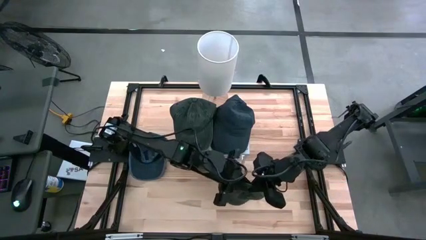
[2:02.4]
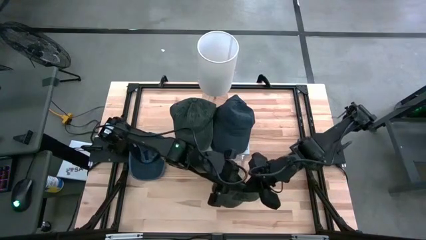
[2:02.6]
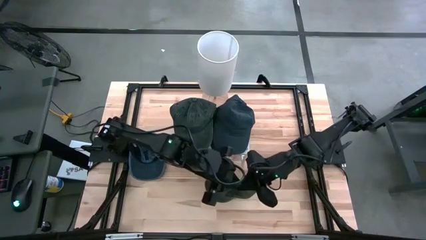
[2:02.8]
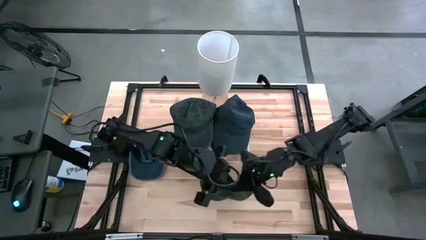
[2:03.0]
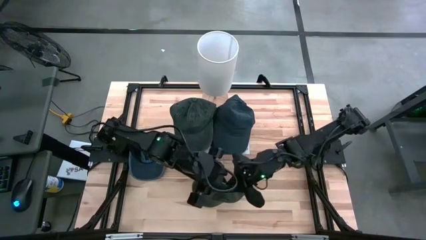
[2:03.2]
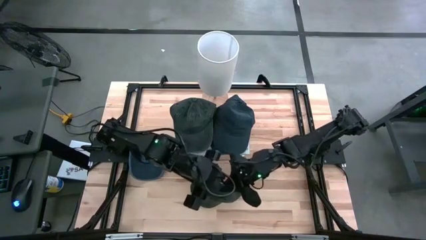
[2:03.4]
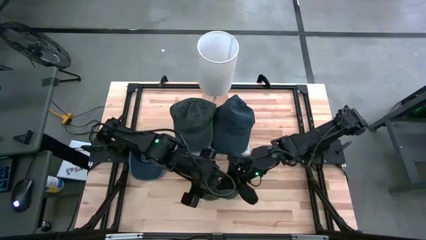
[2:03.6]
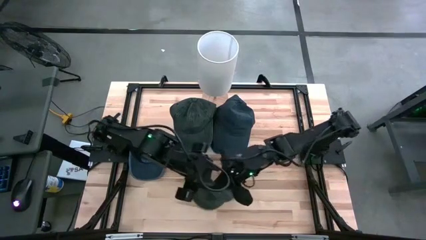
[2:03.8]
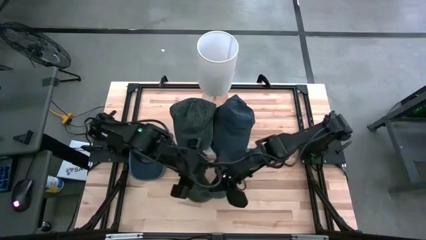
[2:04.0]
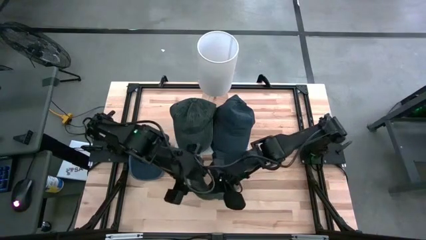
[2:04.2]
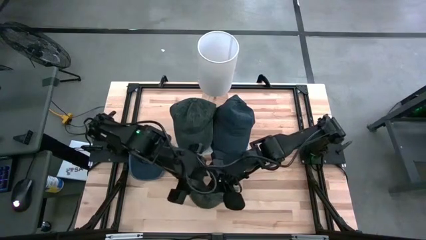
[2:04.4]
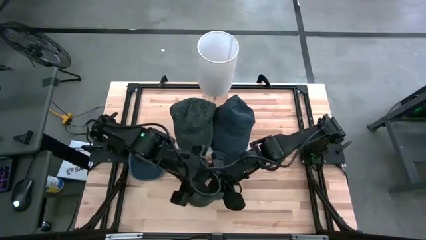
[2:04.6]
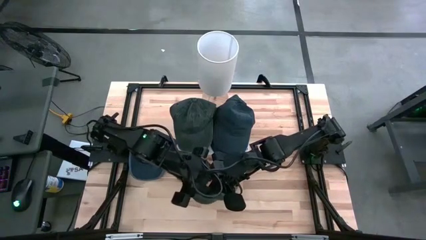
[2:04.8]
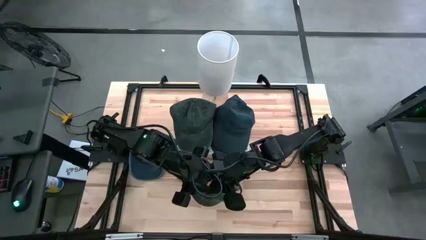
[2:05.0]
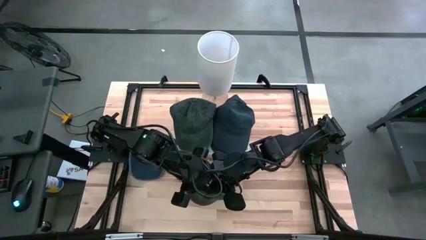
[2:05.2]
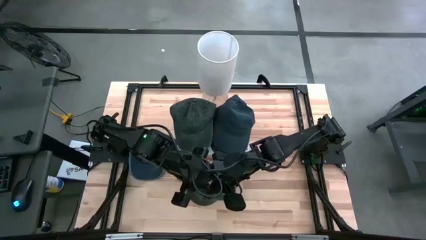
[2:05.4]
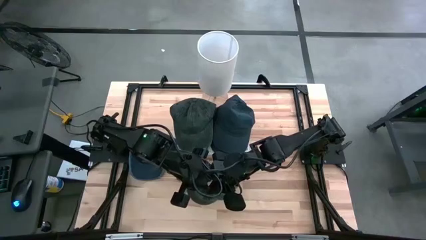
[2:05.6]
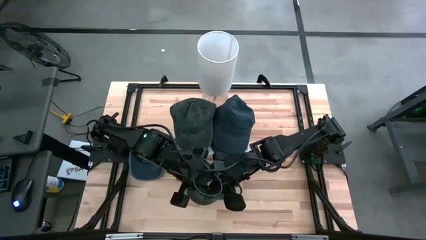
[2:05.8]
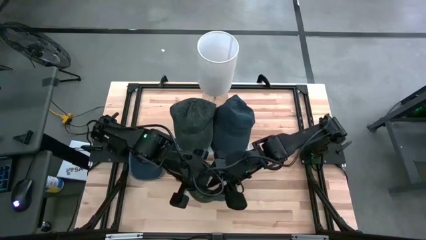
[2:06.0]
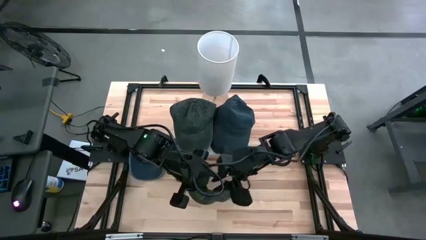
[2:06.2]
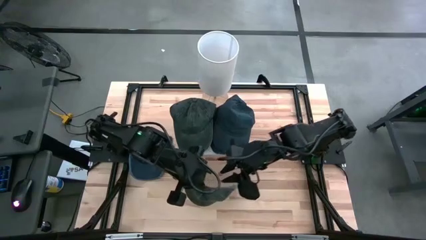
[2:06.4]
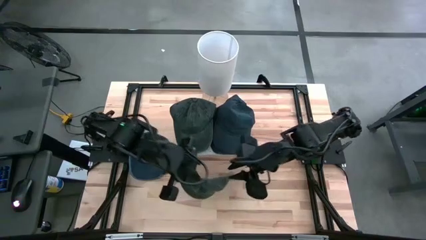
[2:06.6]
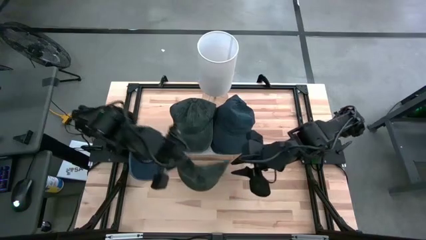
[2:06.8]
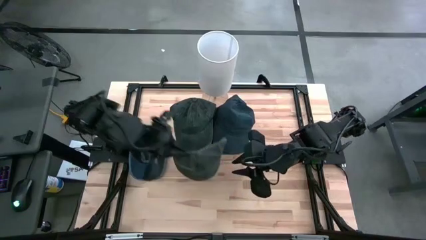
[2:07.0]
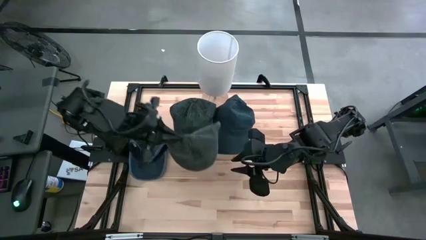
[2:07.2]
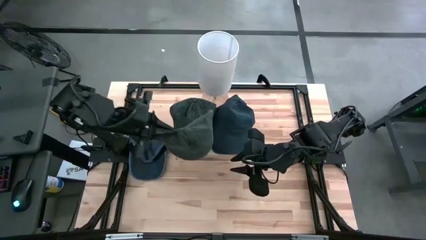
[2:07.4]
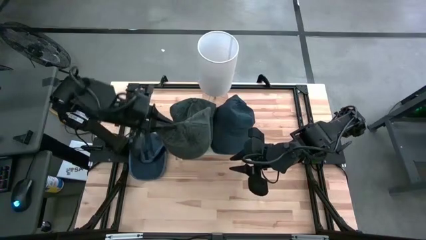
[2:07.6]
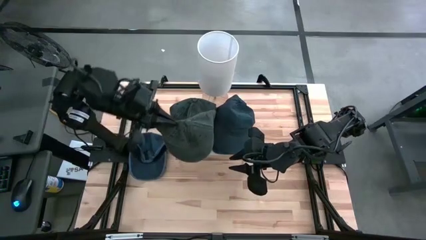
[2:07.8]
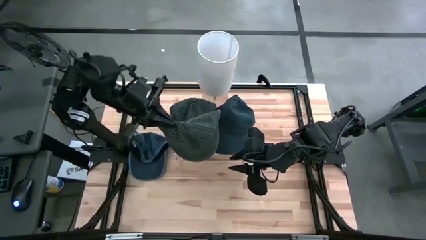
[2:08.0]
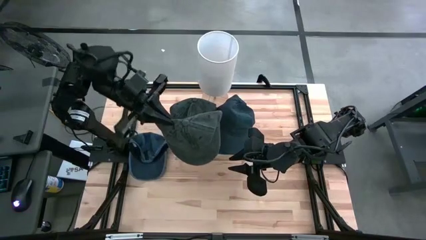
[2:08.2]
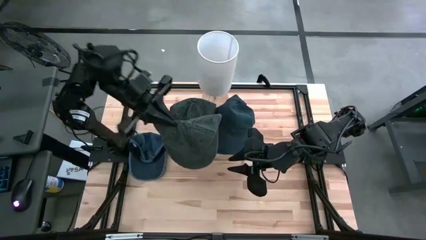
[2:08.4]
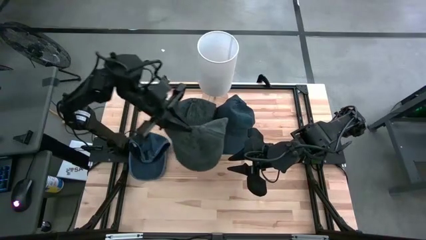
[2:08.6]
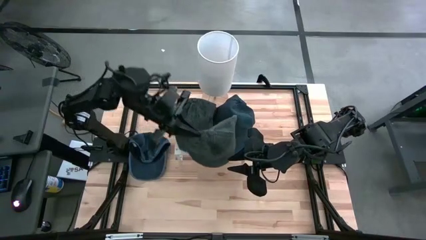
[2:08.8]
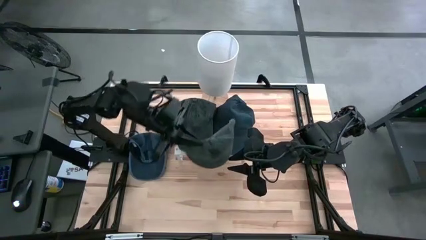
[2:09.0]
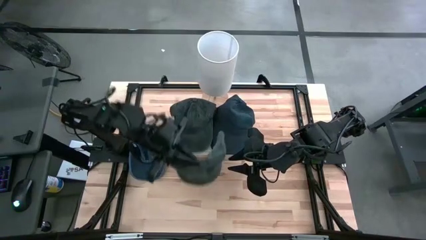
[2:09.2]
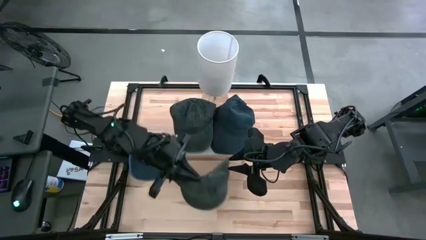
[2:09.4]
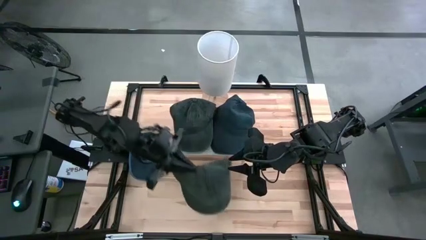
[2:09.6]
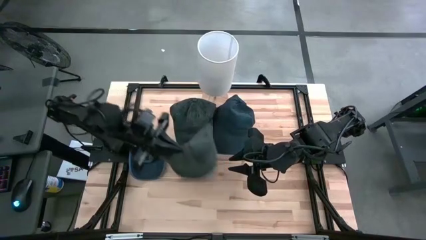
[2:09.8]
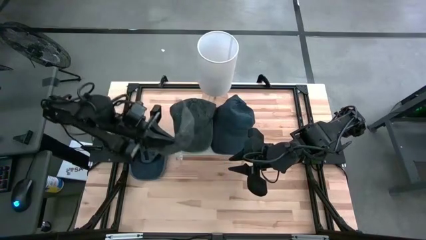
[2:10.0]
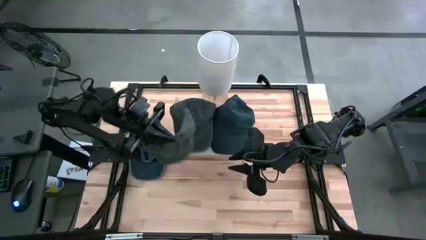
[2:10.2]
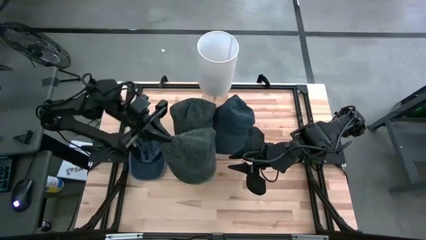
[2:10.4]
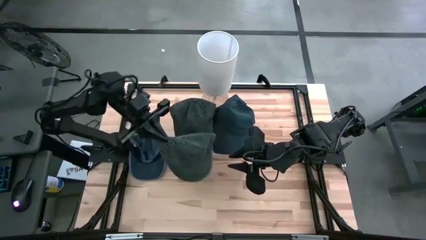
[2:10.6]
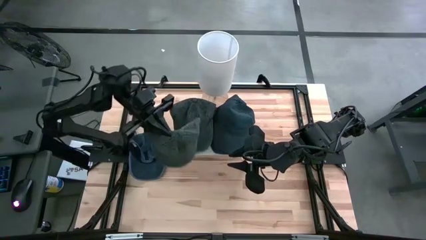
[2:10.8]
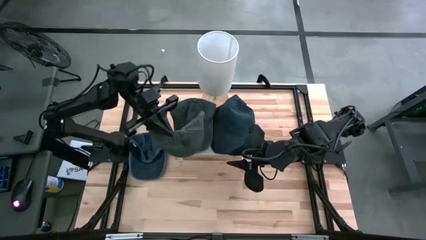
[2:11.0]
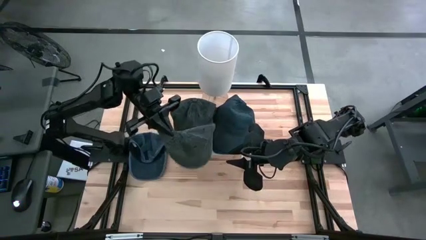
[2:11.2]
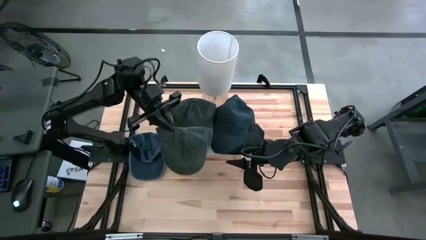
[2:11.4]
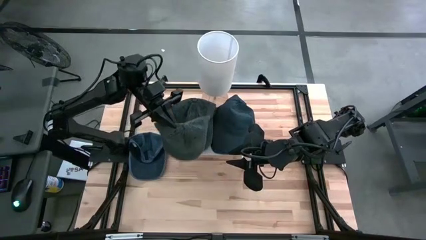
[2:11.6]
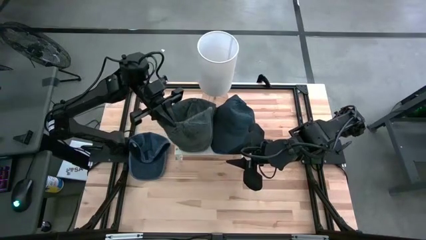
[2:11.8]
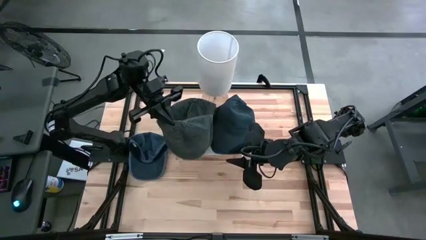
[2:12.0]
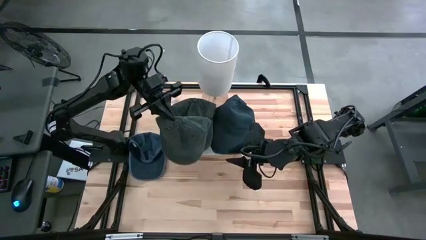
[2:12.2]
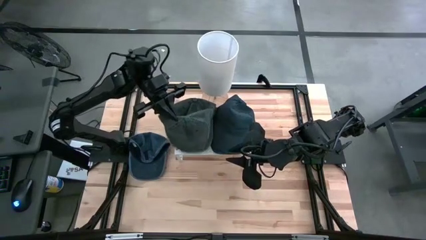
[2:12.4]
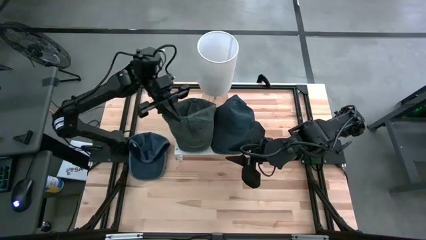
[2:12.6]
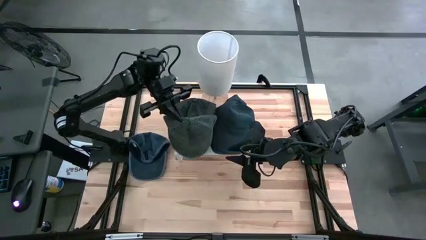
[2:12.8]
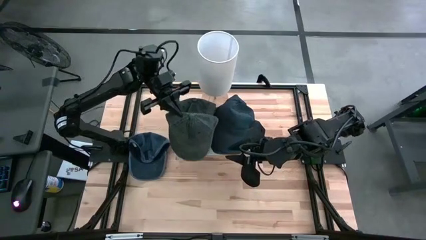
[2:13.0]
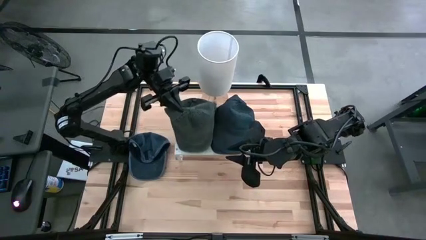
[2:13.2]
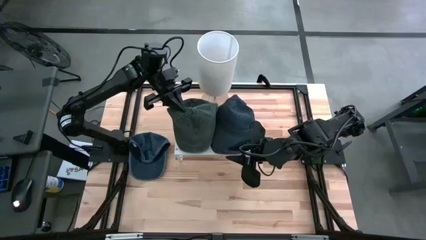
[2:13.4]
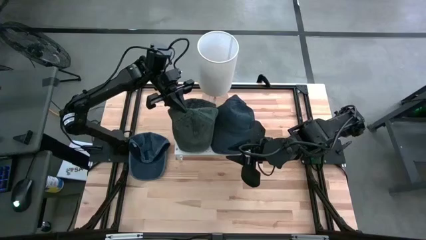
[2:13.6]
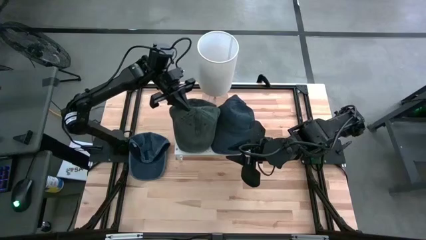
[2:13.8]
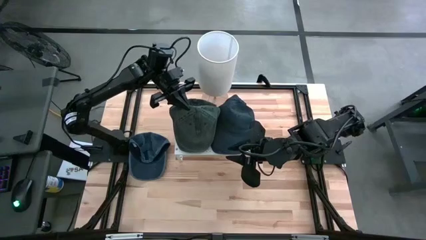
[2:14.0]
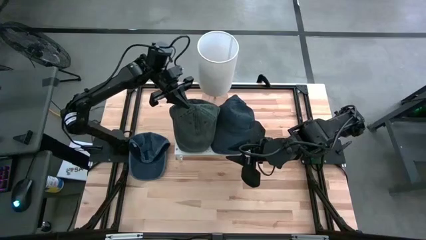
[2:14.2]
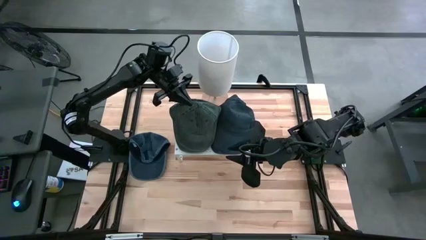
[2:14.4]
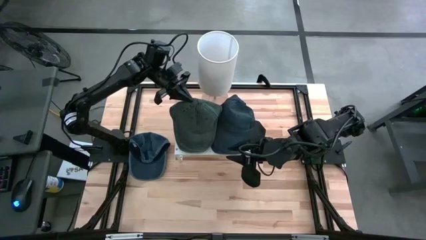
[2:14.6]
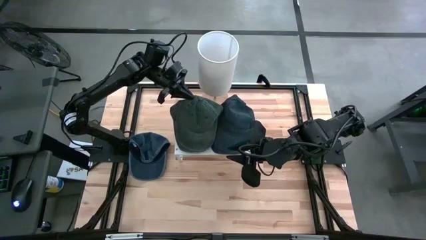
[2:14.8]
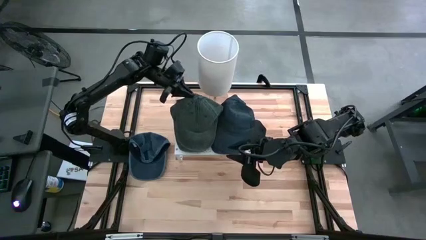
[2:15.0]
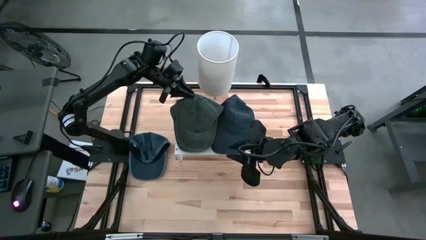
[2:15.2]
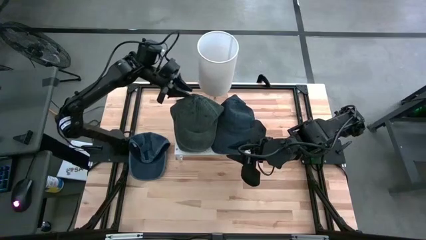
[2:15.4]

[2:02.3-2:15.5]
Task: Pick & Place hat
Stack the green cap on the green cap on the shelf
